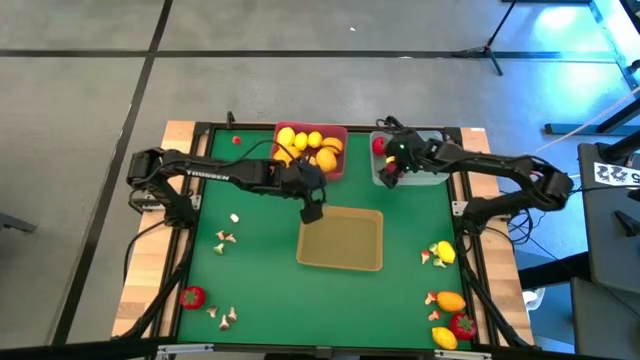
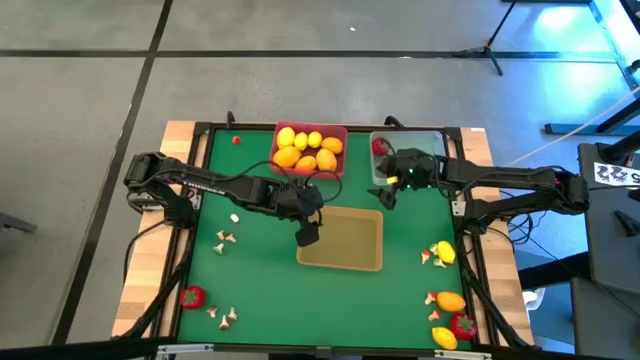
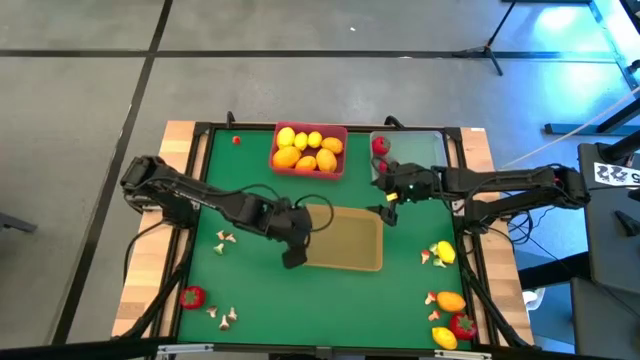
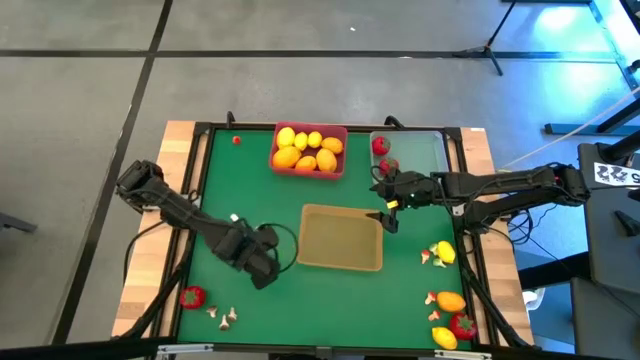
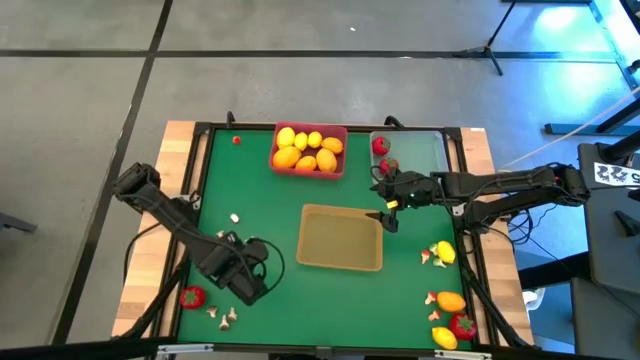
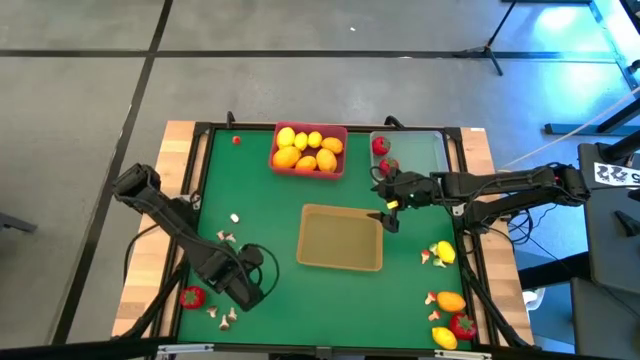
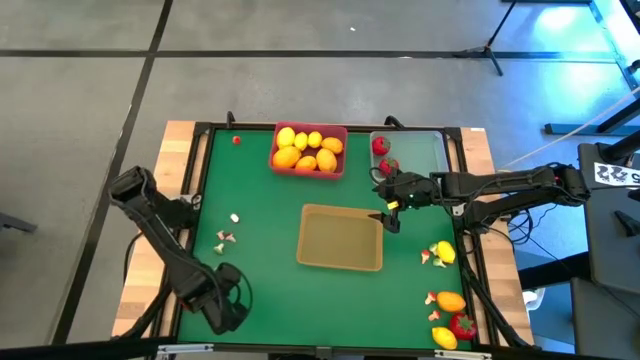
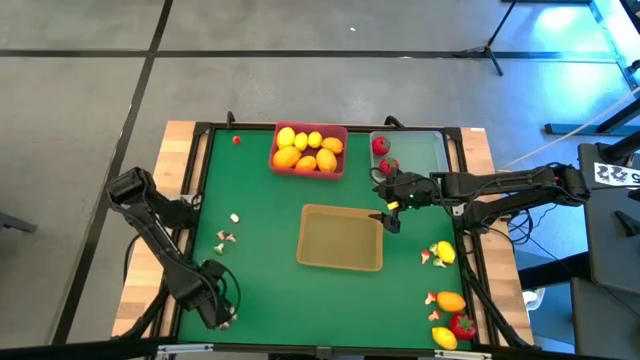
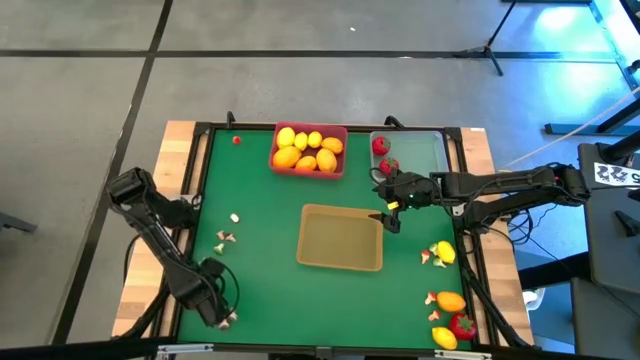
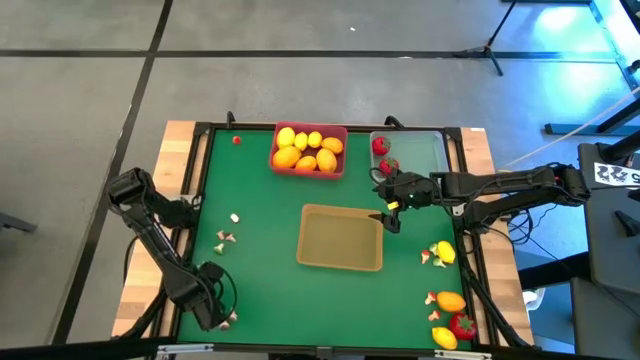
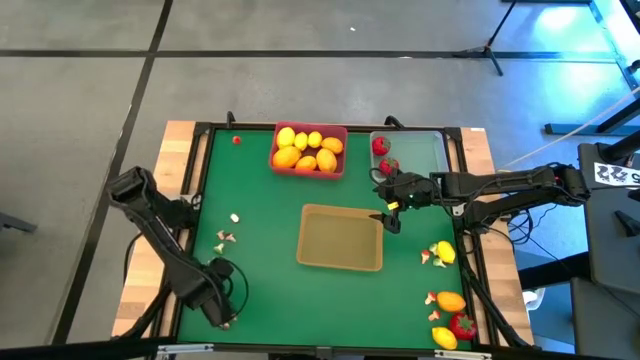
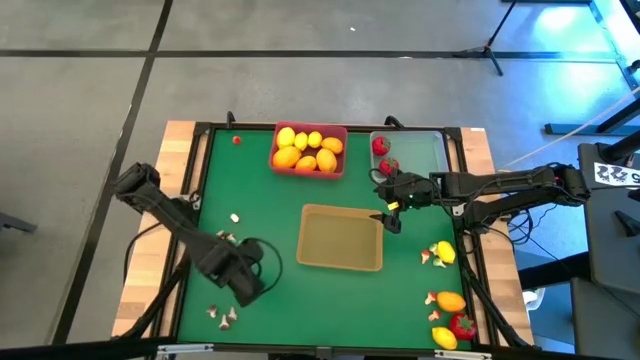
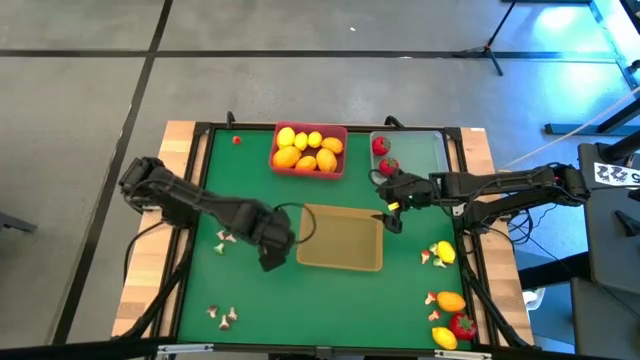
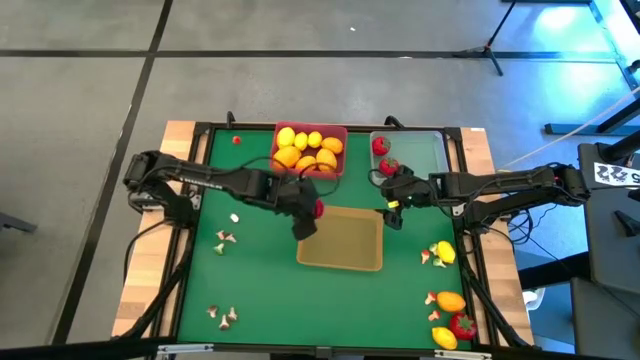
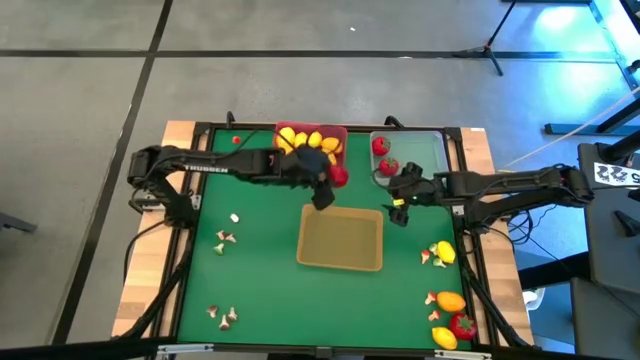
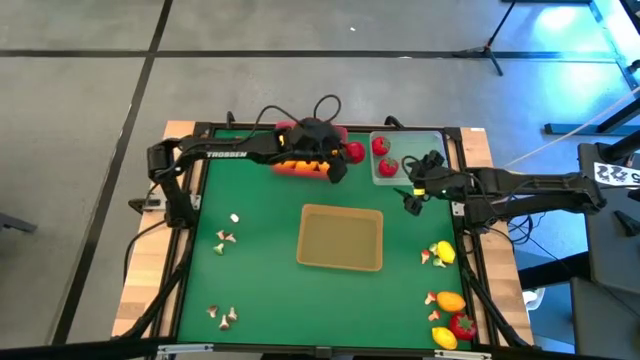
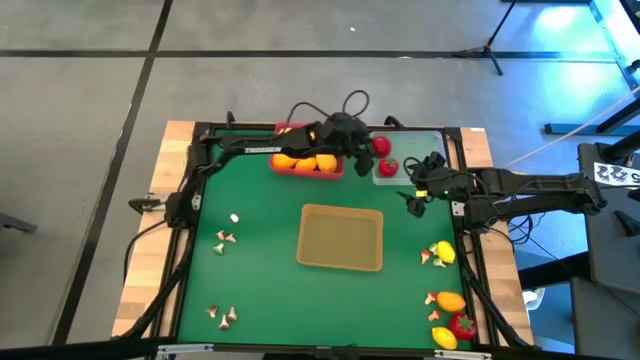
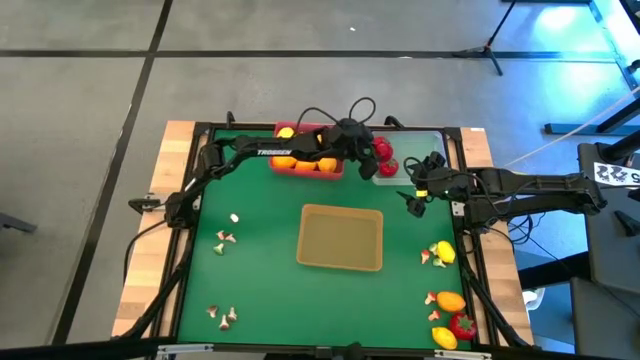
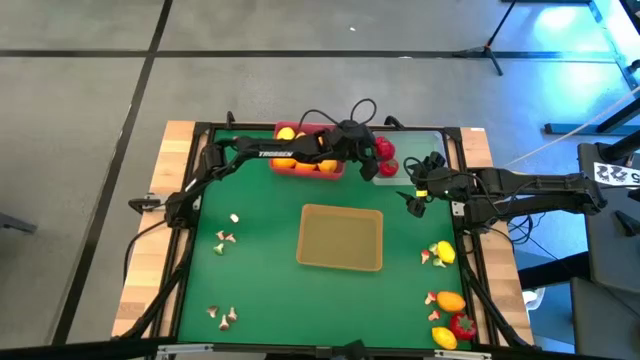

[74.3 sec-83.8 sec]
Task: Sort produce into baskets
Put the red tomato into the white bin

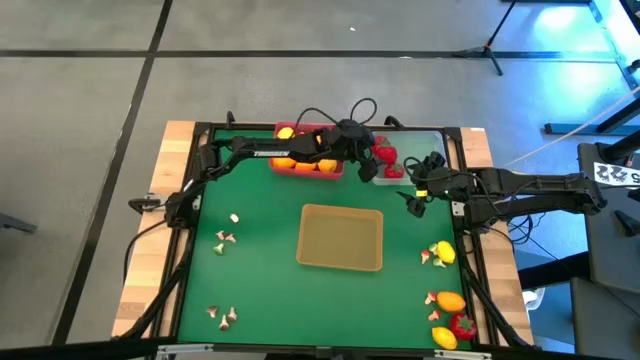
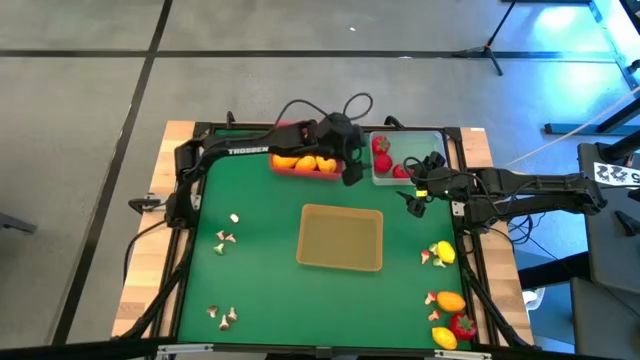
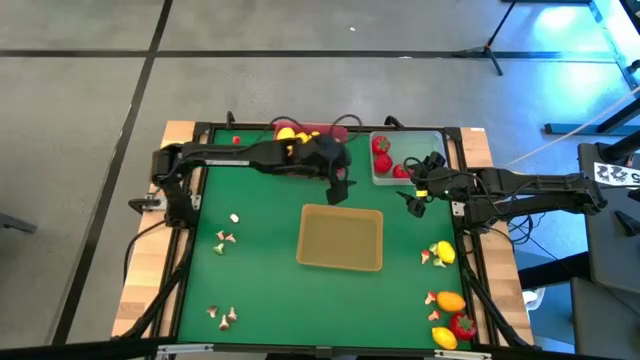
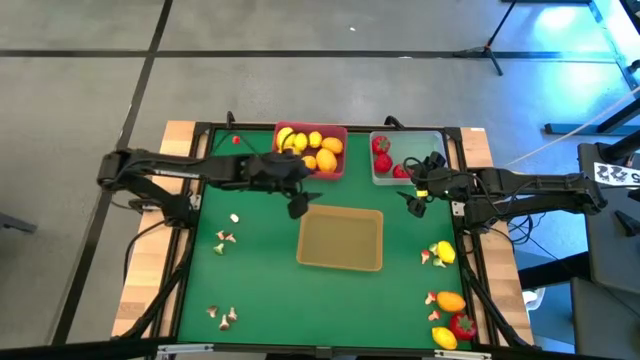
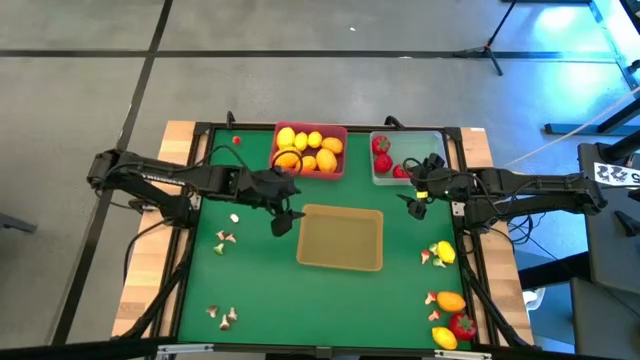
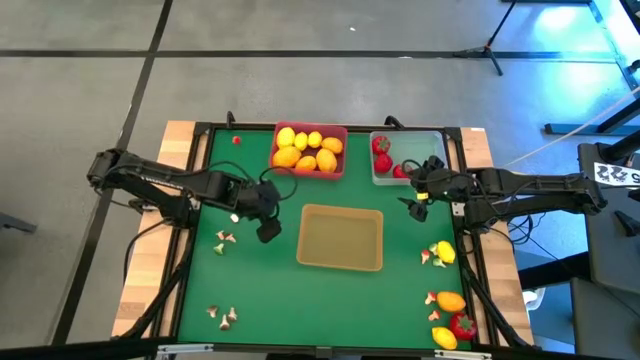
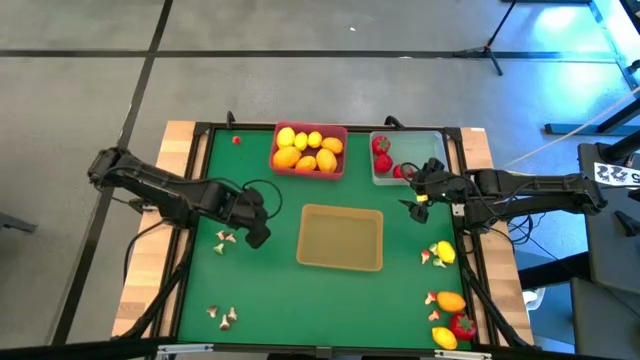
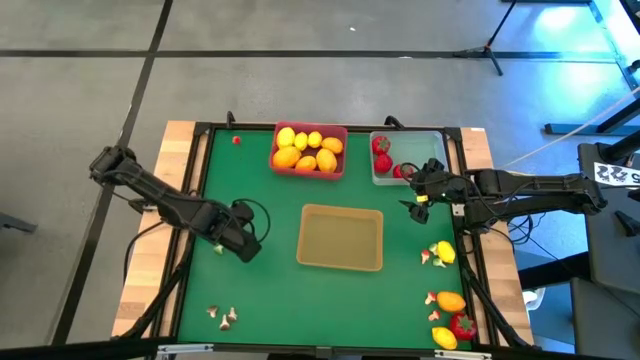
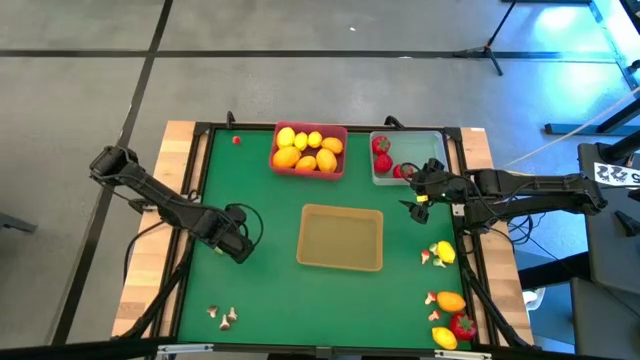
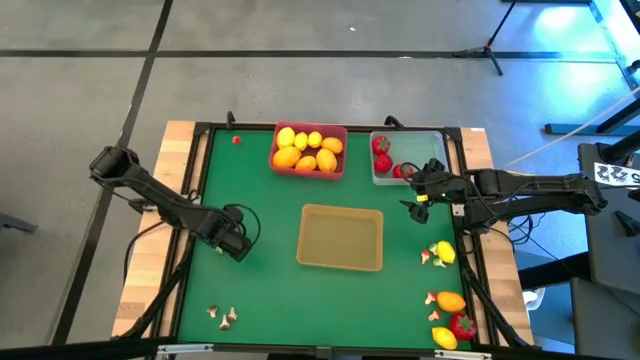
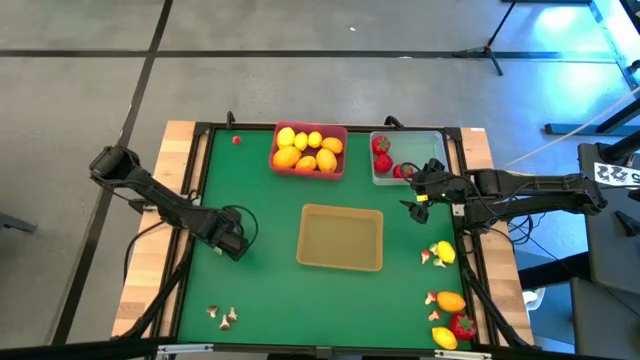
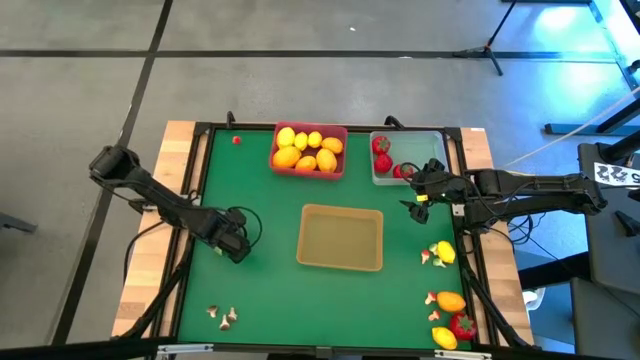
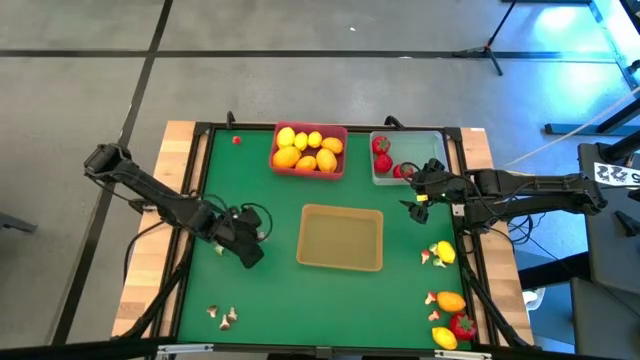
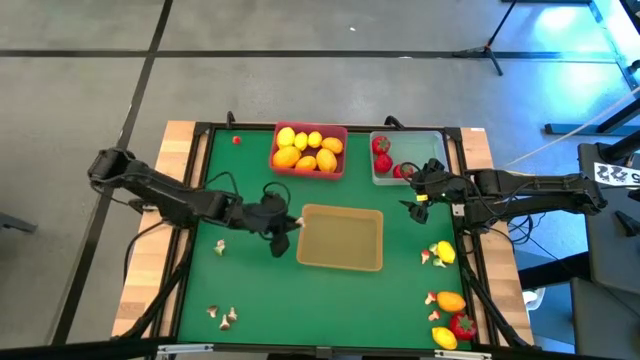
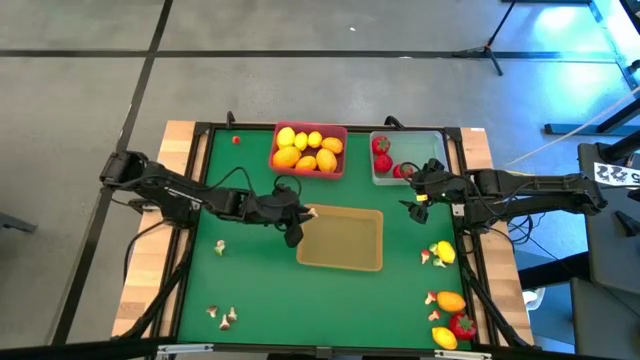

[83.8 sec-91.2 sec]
Put the brown mushroom into the orange bin

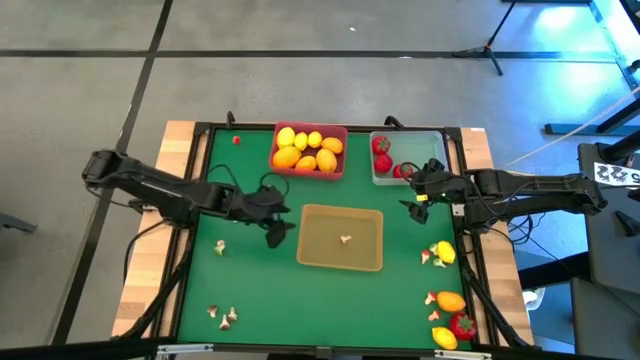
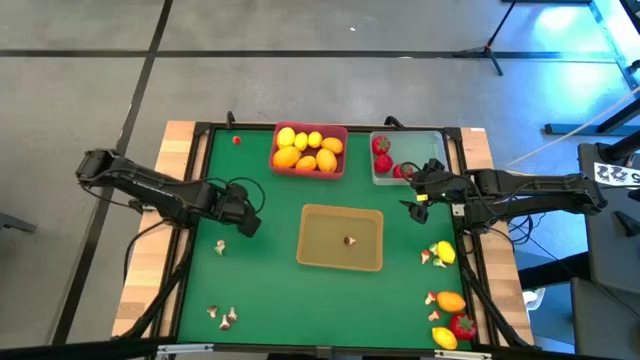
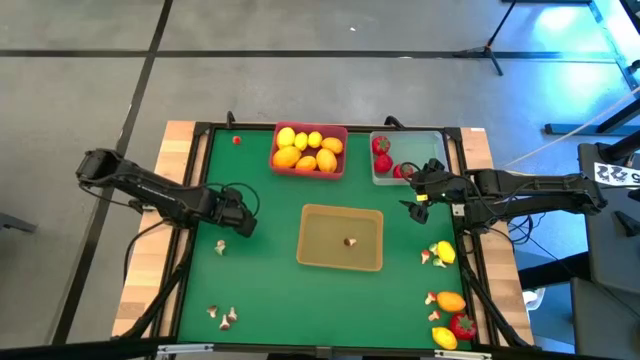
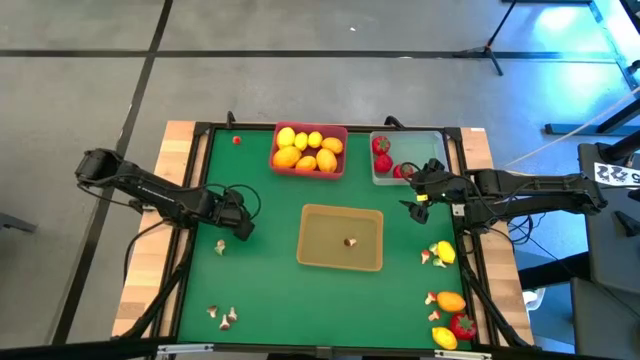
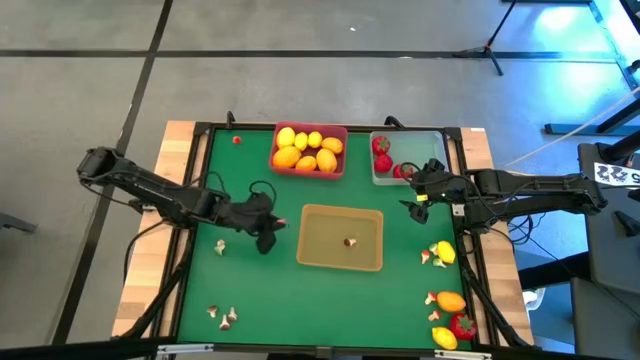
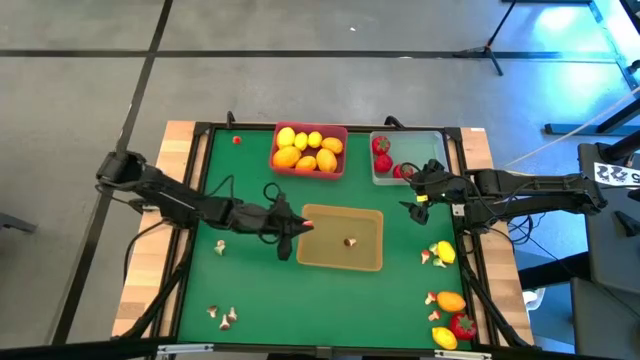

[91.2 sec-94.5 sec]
Put the red mushroom into the orange bin

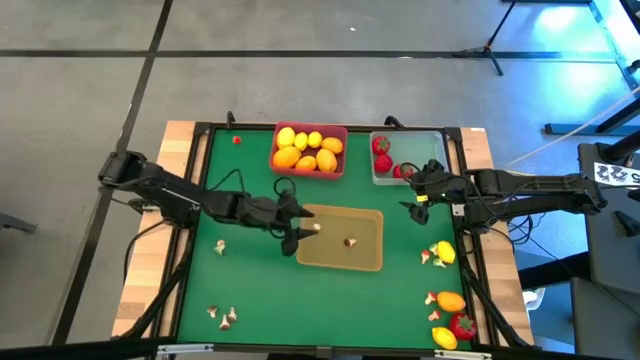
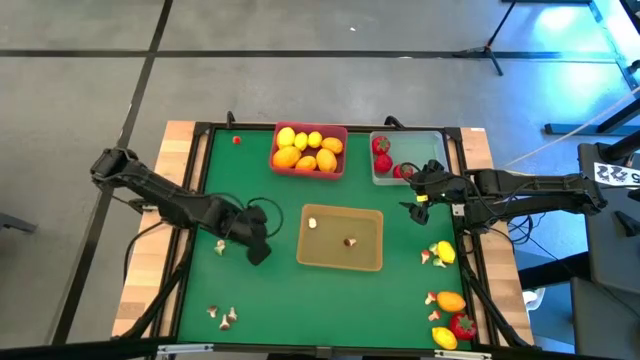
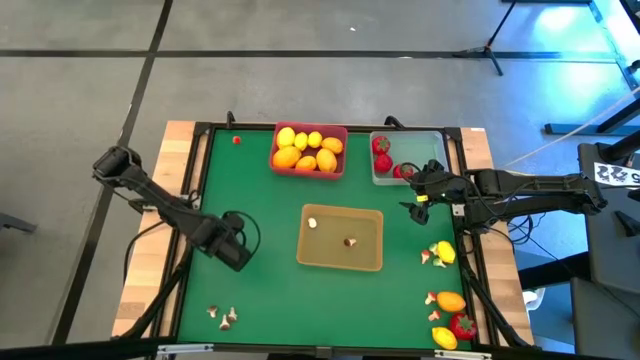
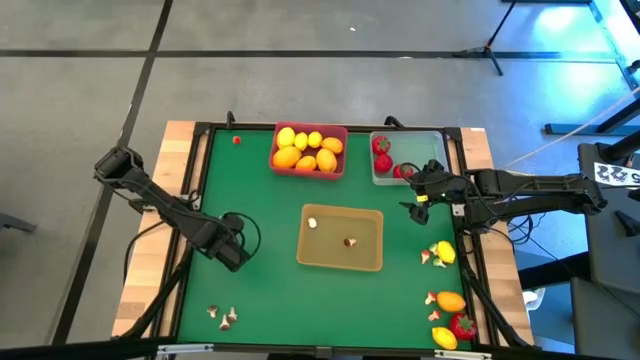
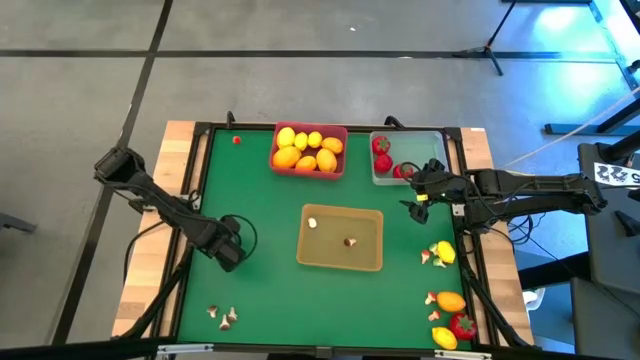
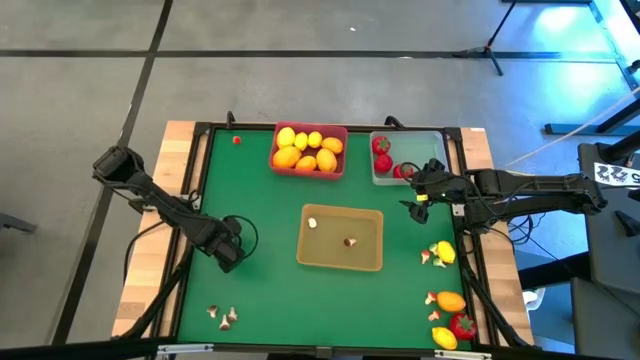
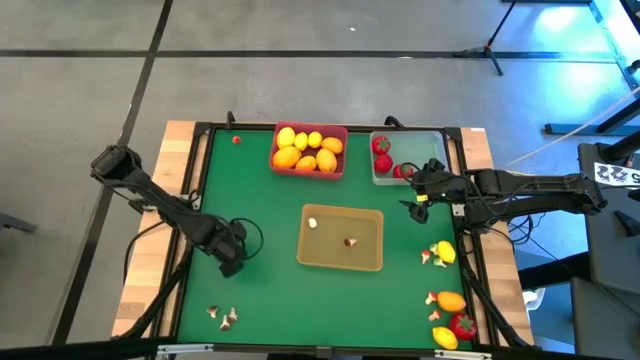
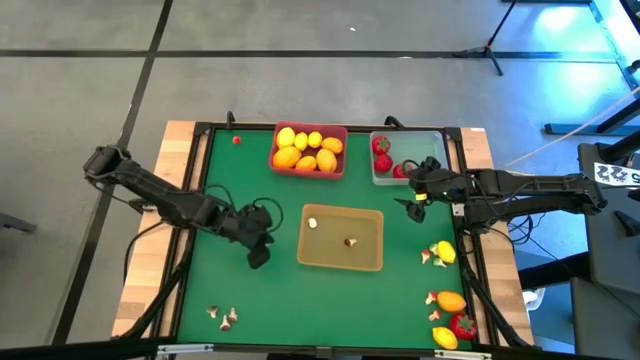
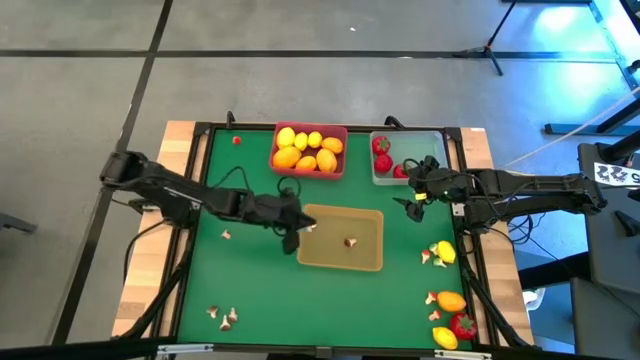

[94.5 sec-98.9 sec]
Put the green mushroom into the orange bin
